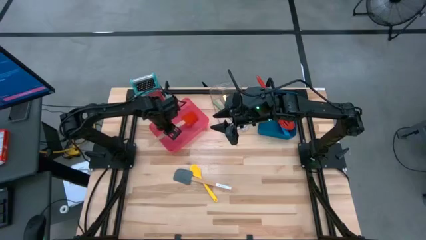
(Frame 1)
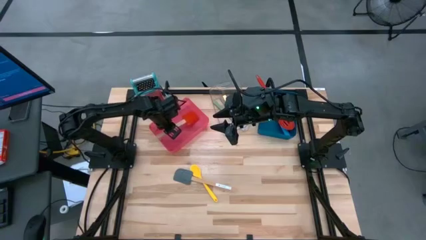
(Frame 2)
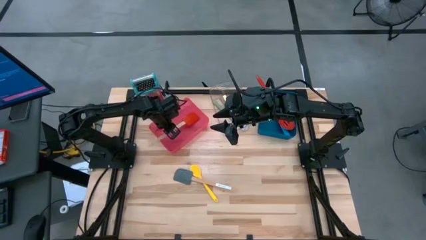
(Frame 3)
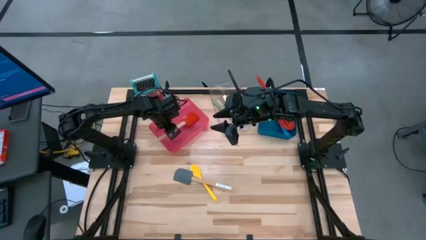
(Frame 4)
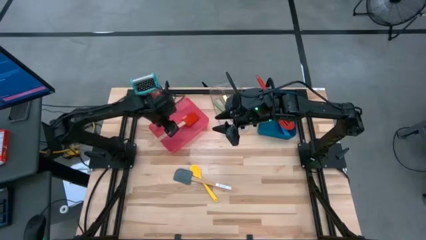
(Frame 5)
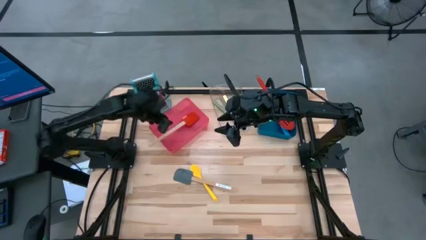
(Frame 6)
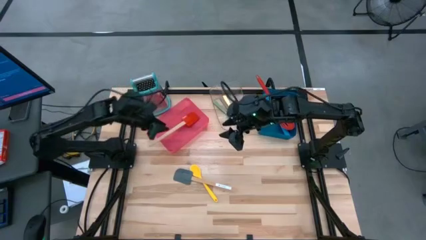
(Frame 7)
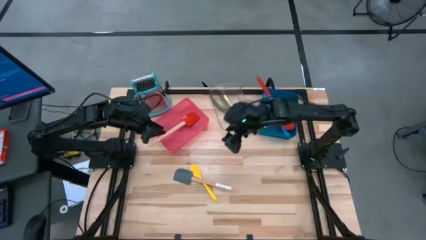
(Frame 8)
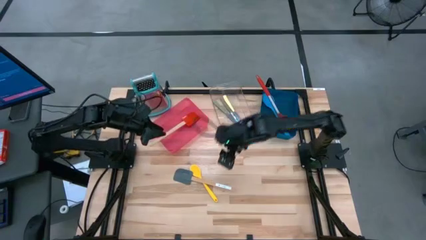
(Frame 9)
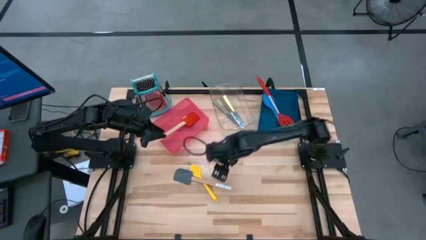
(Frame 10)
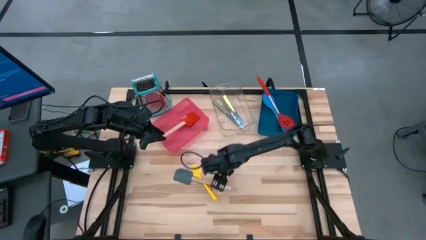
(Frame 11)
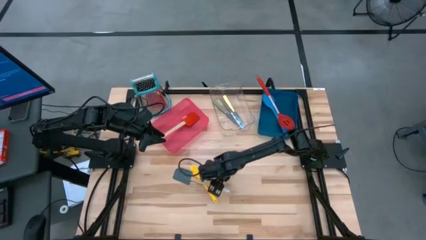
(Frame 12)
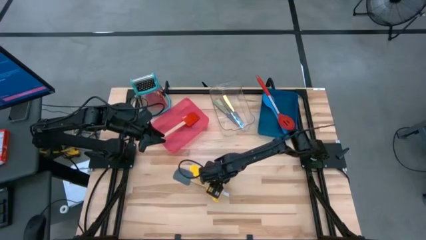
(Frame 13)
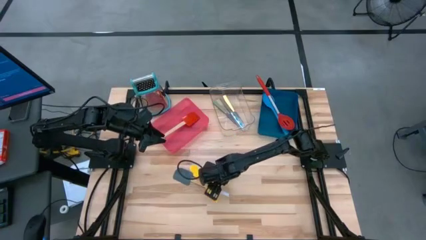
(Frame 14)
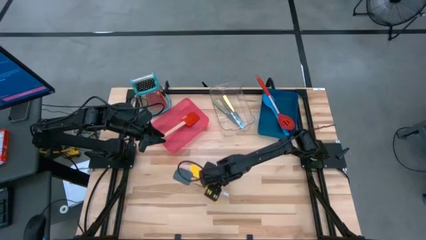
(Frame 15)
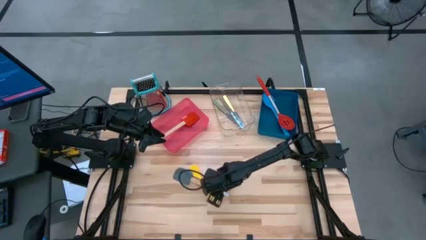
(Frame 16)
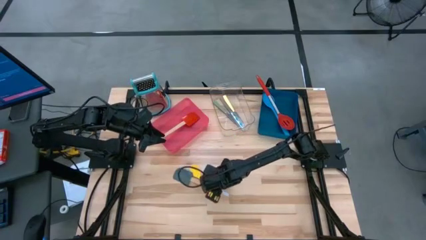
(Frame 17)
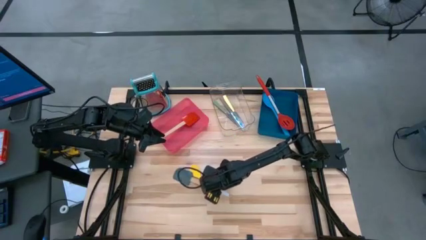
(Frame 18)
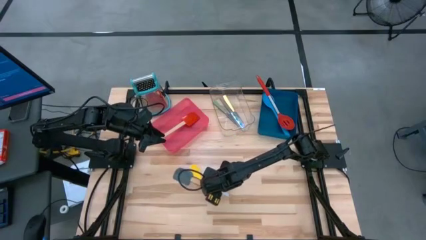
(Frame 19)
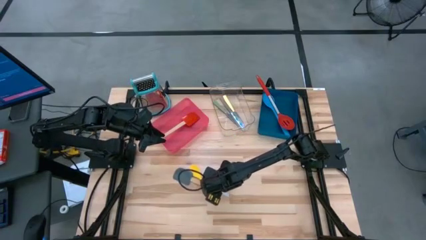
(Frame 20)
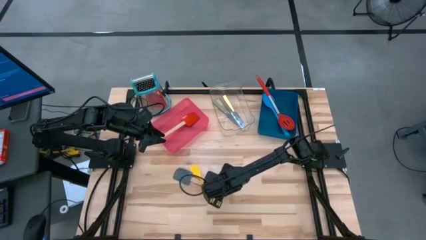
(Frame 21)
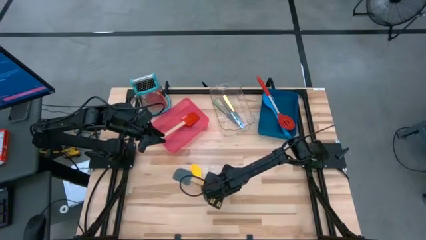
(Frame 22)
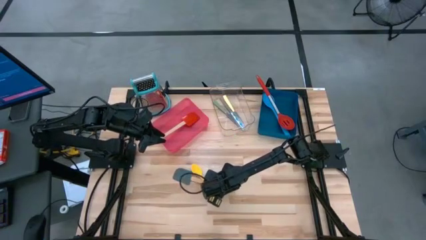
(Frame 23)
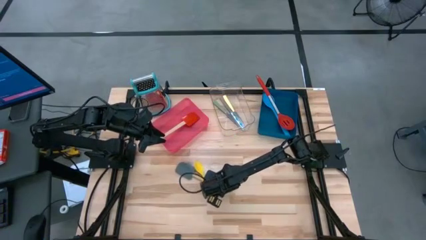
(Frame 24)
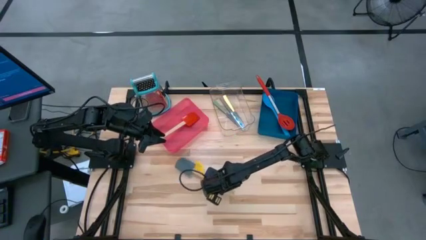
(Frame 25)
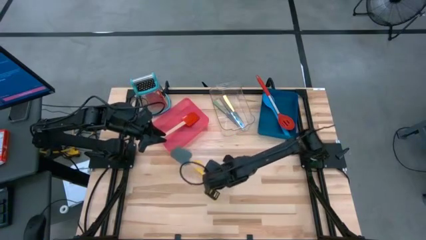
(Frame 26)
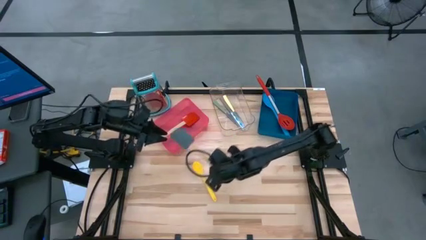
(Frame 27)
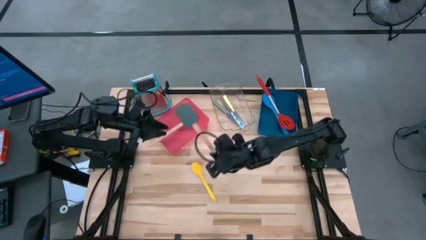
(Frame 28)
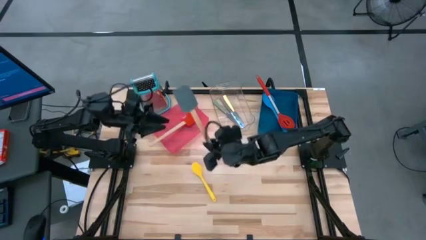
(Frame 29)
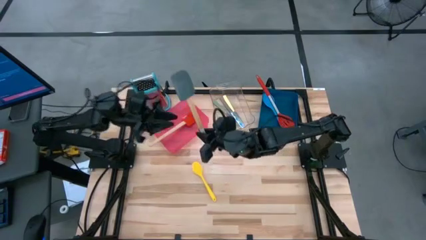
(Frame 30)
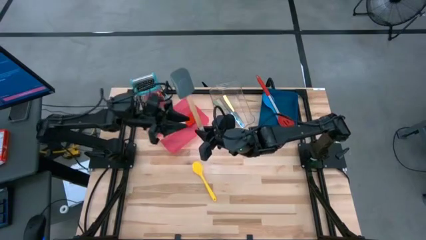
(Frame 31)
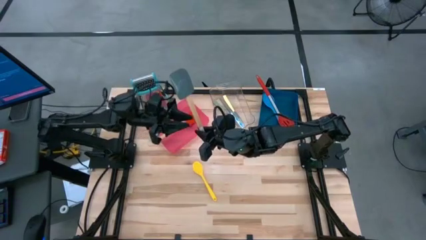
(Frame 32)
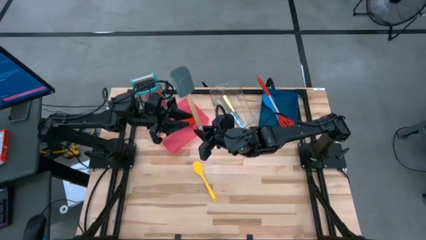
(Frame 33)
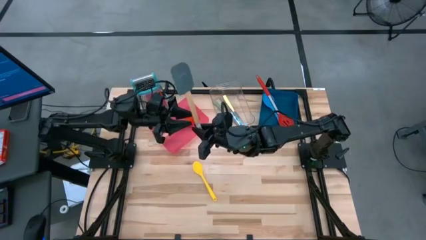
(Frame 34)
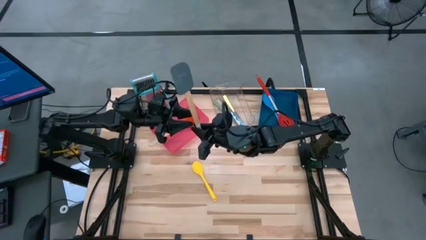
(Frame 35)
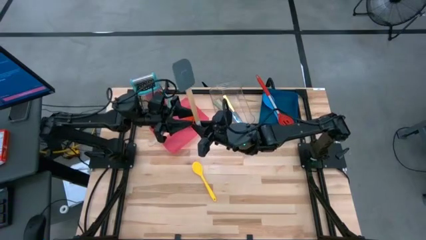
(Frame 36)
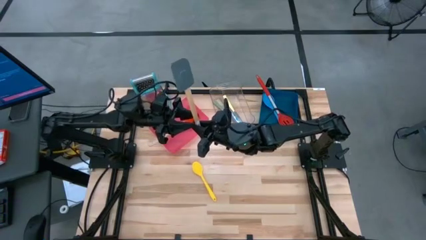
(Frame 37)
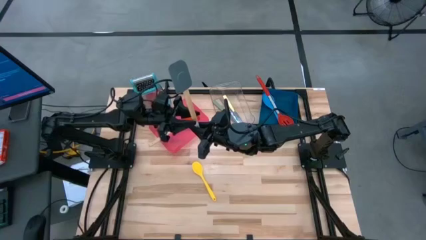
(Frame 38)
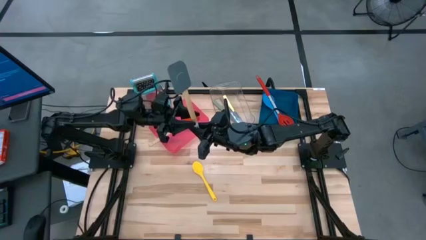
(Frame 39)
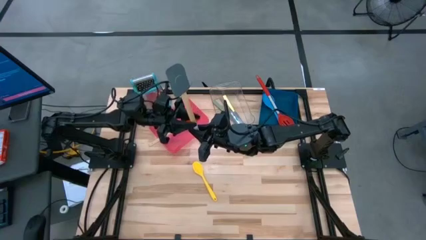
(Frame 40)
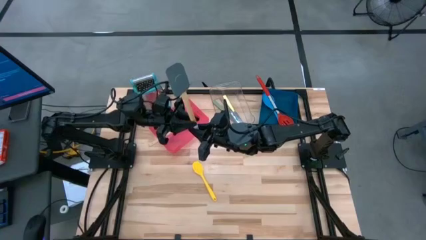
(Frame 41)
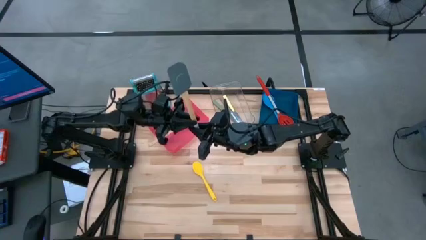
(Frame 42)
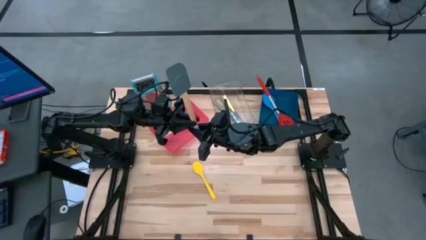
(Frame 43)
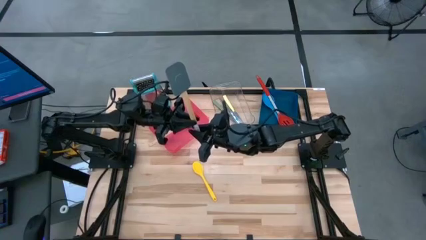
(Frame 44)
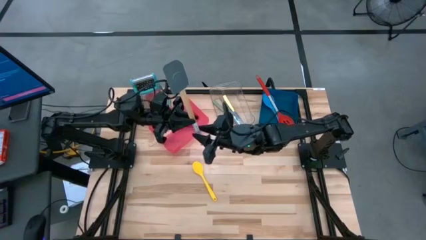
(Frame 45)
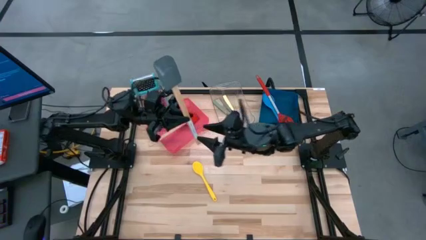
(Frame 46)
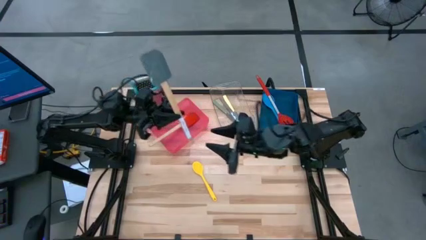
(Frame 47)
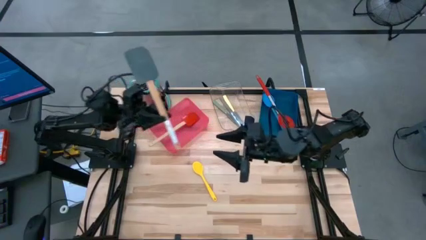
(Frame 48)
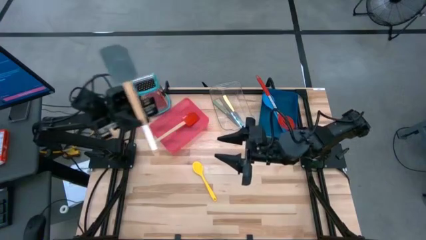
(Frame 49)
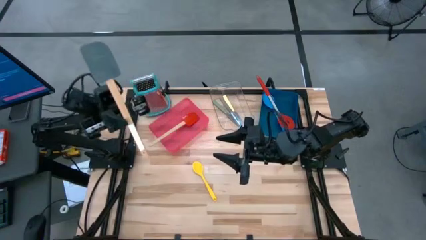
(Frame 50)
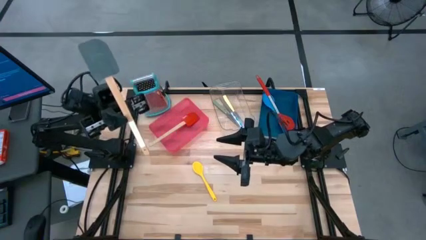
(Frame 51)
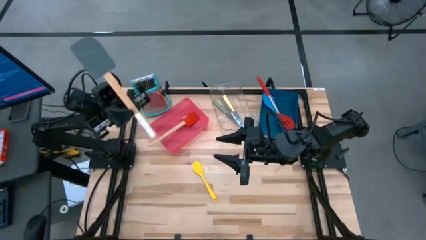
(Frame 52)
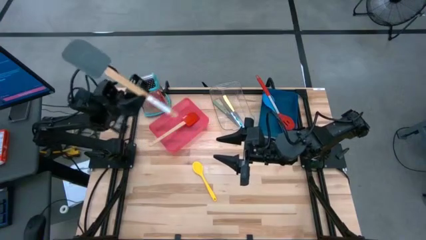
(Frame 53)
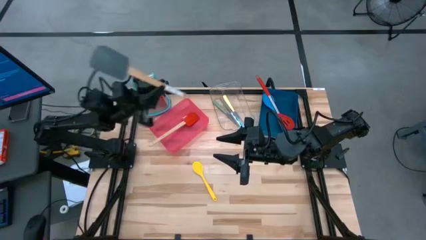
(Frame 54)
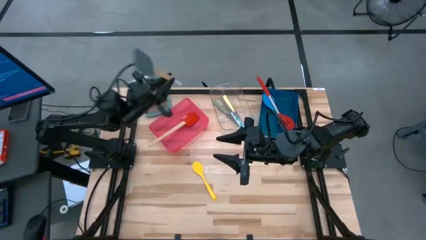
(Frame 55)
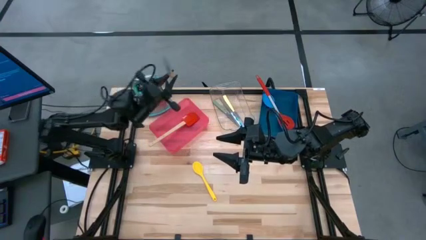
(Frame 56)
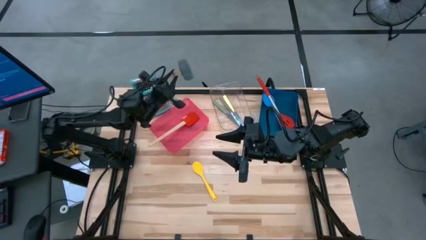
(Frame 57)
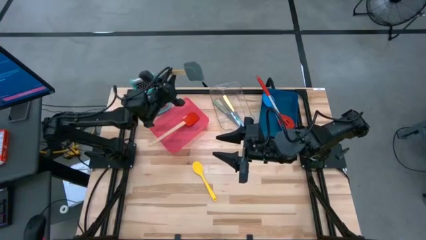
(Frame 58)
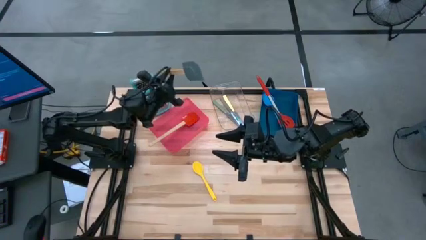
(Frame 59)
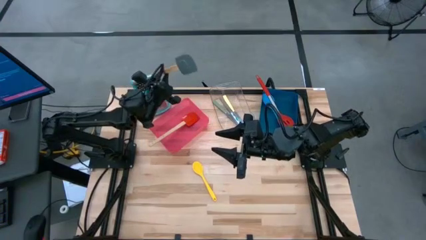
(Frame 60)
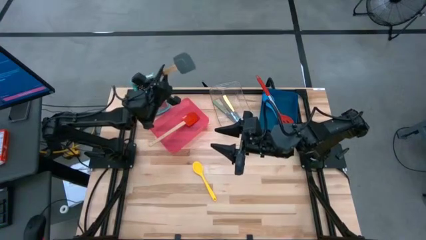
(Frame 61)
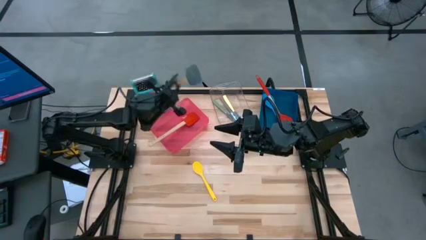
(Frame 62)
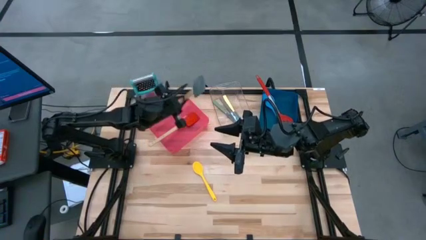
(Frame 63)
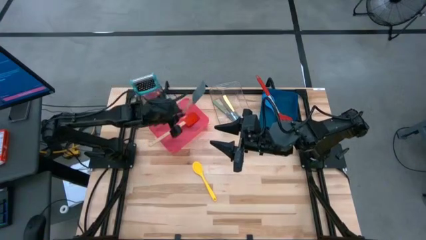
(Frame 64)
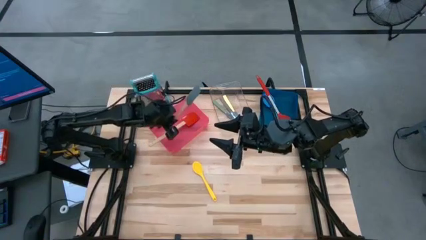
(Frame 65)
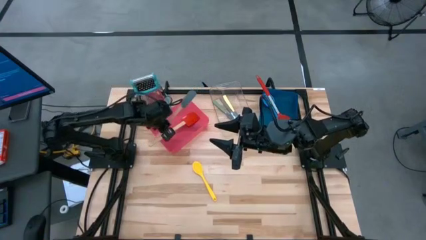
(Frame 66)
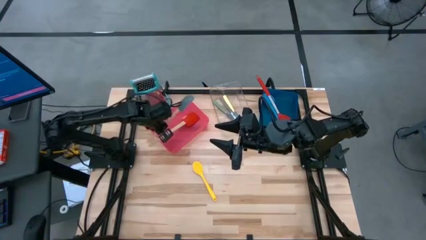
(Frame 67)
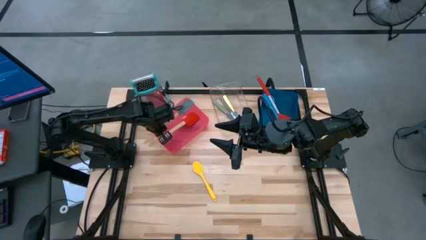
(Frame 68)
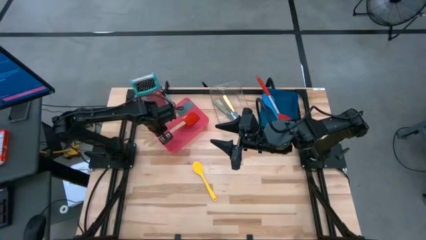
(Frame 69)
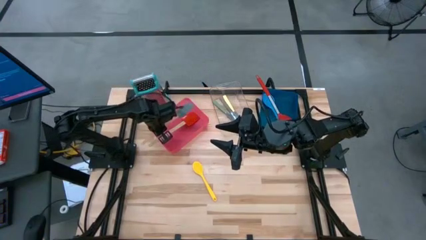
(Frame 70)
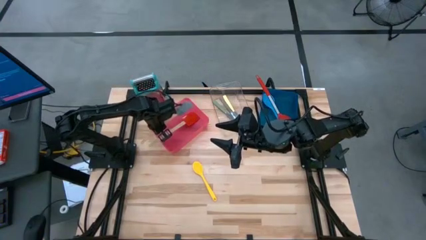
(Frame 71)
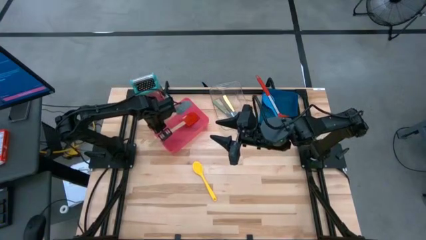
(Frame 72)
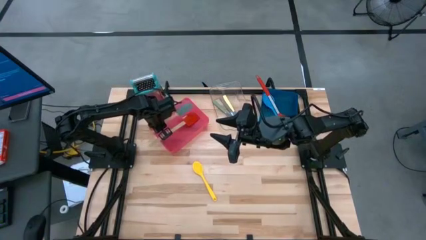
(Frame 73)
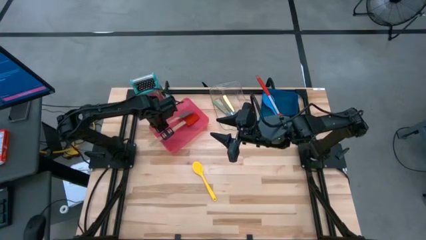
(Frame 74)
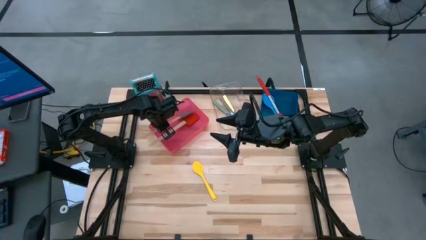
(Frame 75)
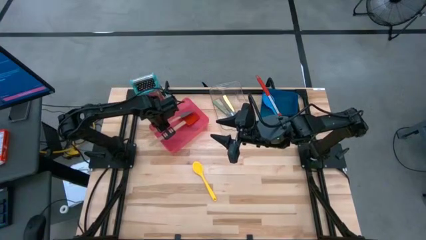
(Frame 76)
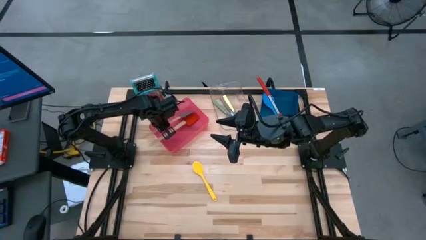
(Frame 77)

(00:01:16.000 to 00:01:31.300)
Task: Pick & Place Kitchen Items
Put the blue spatula into the red bin
